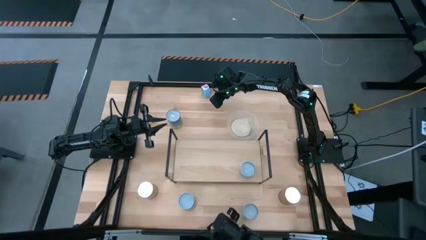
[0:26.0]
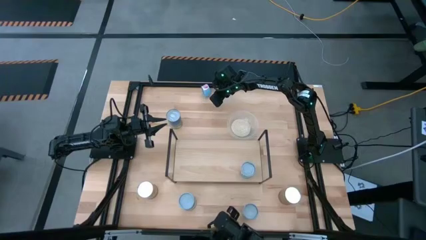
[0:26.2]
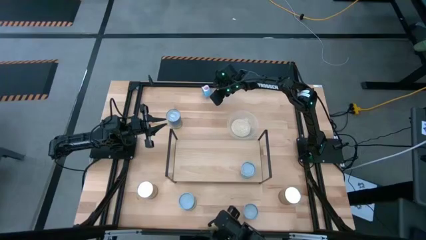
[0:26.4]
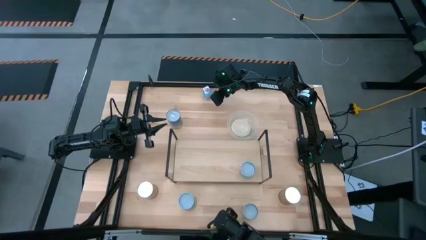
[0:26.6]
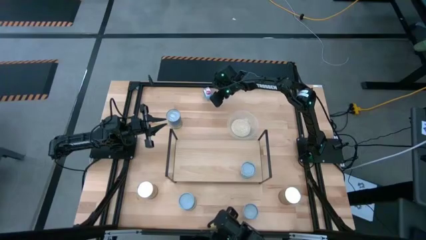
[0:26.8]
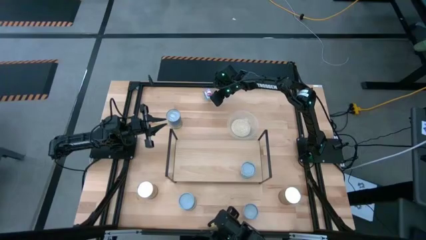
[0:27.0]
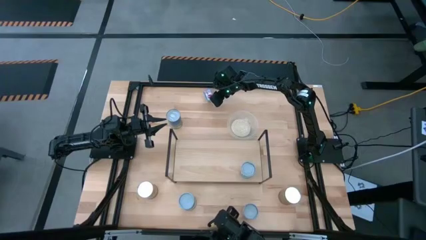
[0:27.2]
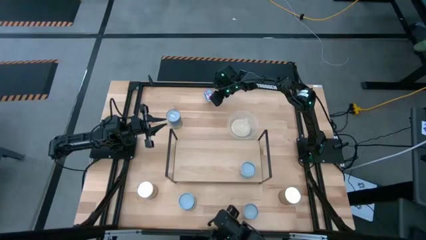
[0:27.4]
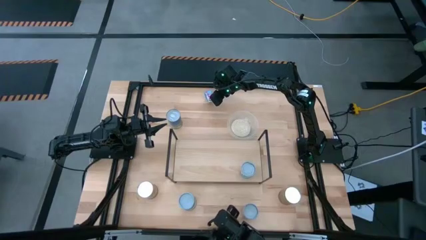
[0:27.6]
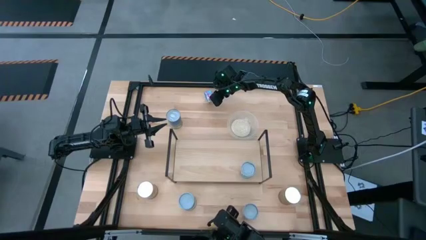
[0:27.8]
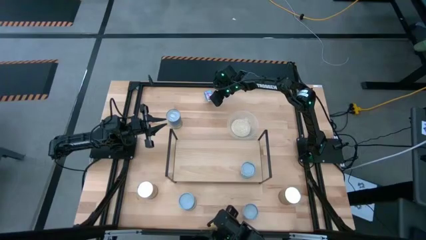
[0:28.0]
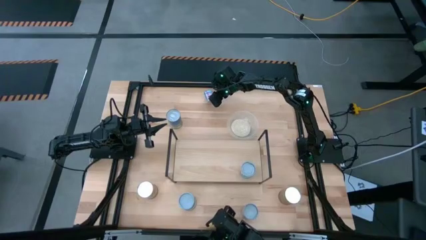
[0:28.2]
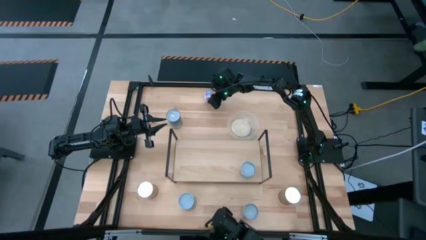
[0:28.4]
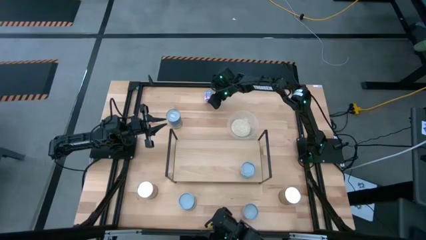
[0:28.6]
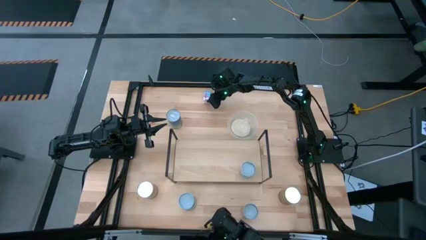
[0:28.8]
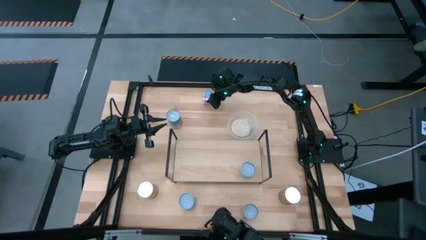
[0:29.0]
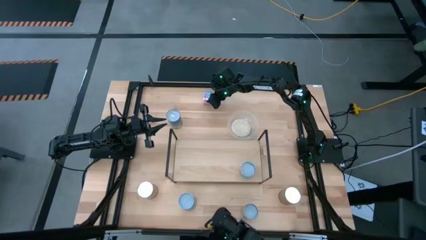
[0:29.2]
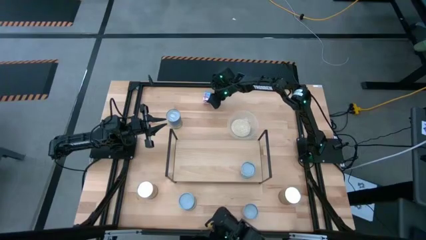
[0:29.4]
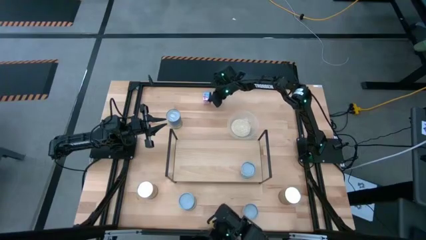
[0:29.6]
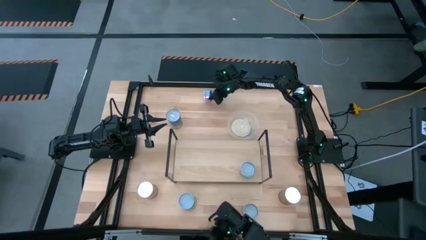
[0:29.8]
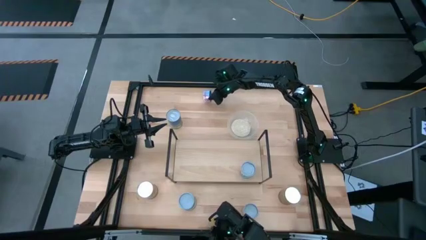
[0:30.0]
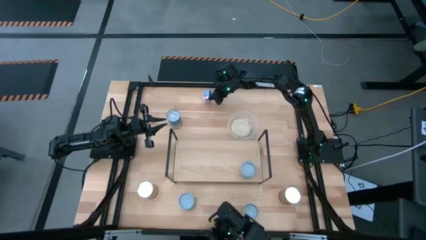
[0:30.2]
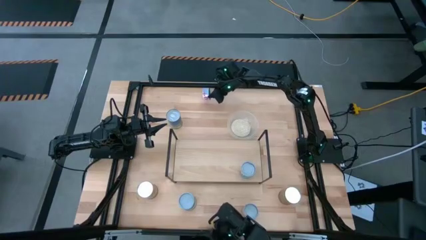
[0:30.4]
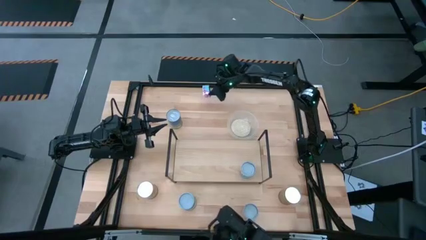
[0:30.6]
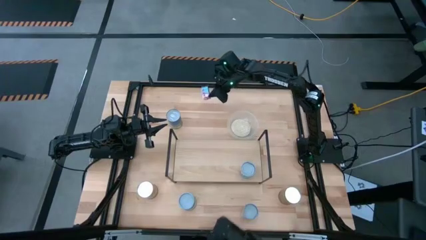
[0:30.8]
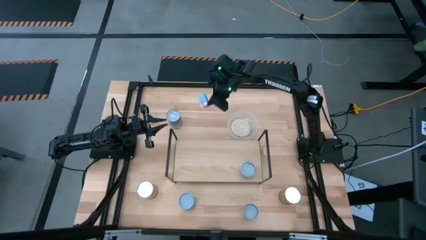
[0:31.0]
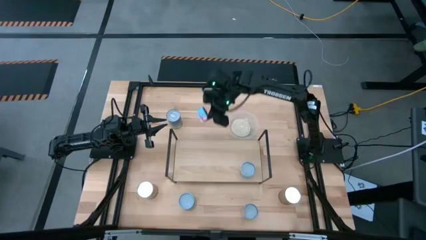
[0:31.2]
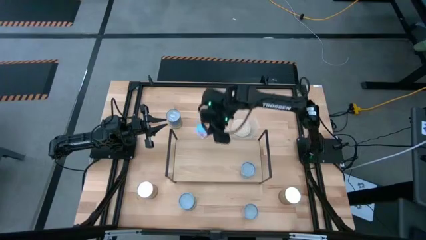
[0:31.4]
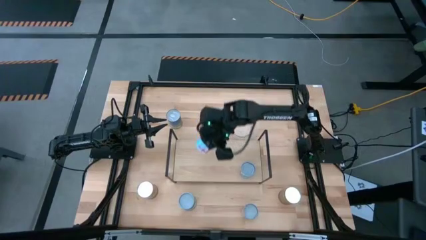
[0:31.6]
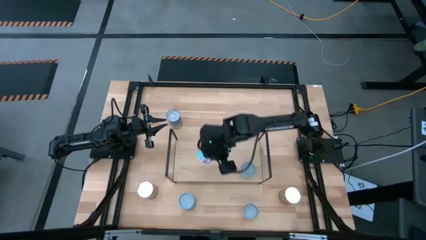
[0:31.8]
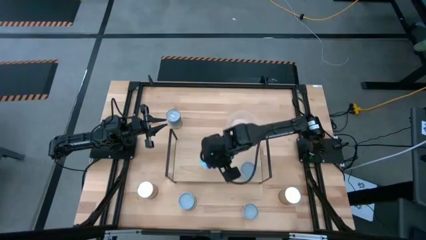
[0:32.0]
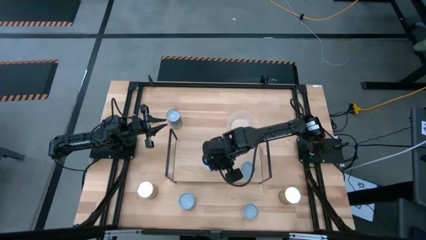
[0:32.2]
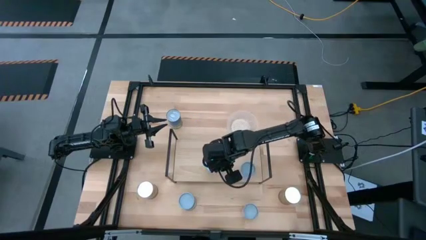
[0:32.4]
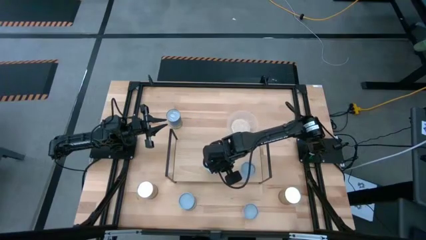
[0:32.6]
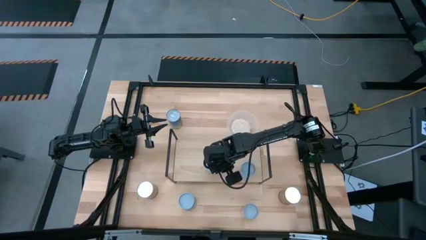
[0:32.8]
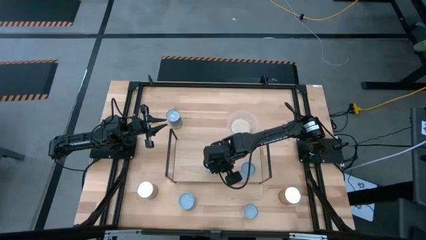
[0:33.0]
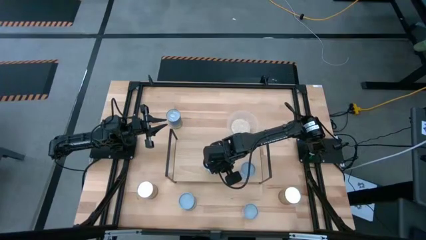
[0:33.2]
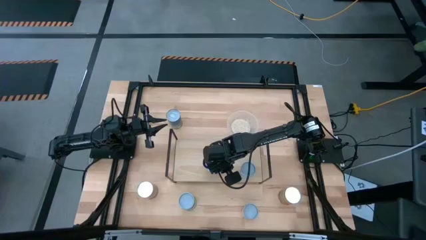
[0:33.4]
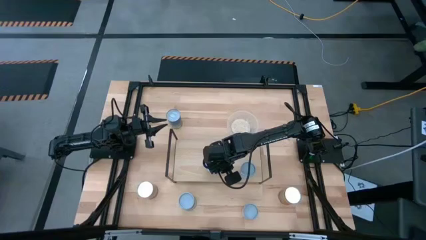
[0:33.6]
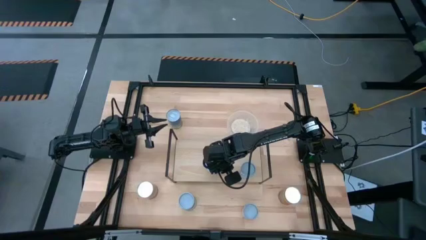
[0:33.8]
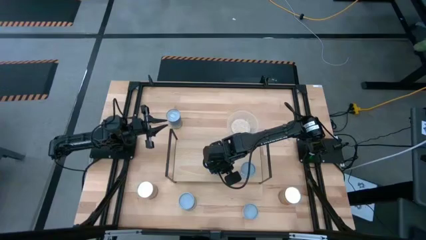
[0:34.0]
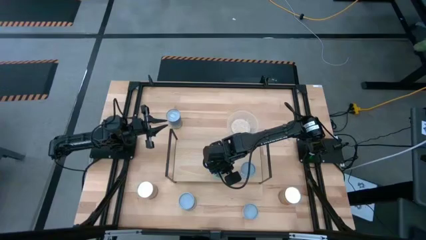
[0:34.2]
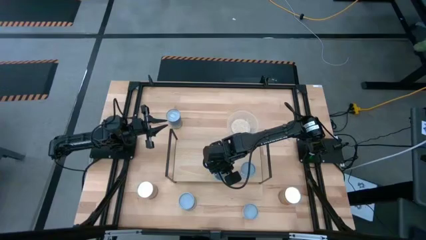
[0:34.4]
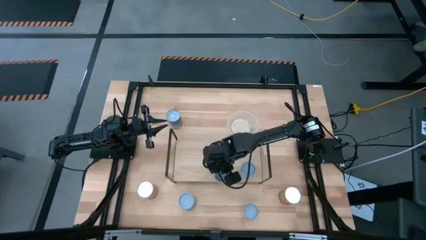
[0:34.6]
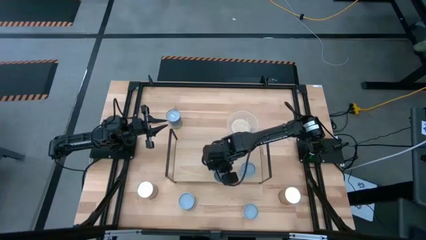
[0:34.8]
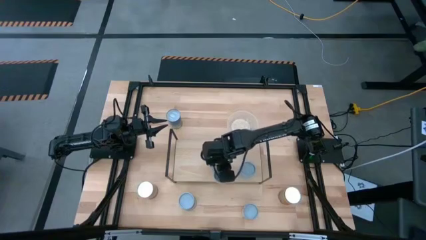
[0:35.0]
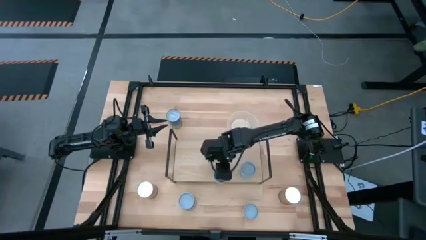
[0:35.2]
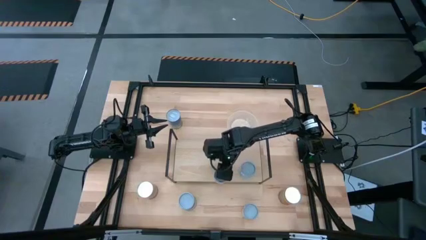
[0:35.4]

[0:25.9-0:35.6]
Task: Pick and place cans onto a shelf
Put the canned tuna on the shelf

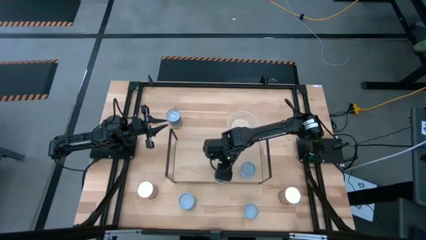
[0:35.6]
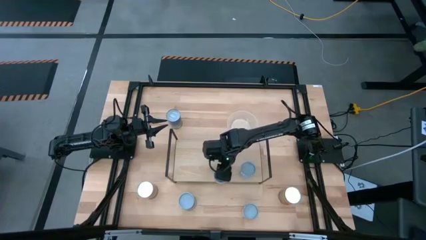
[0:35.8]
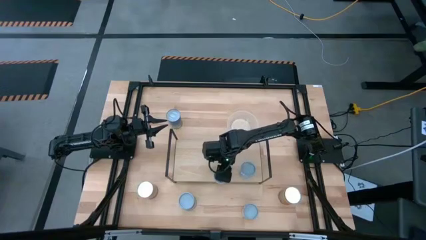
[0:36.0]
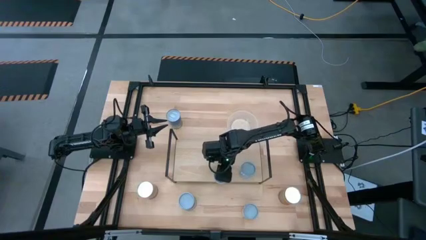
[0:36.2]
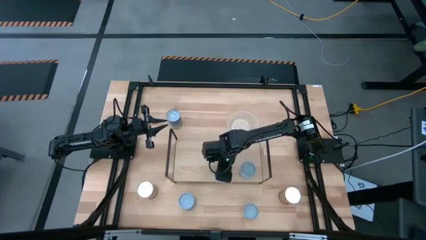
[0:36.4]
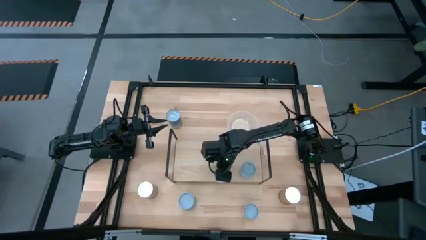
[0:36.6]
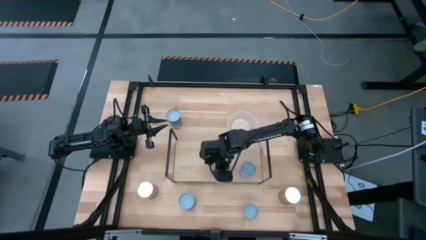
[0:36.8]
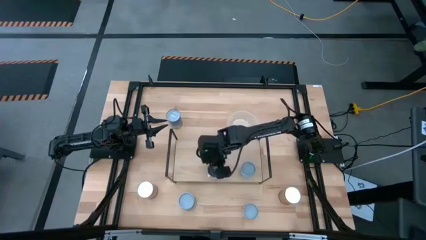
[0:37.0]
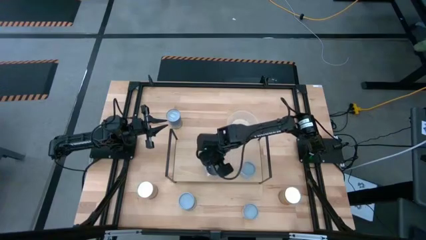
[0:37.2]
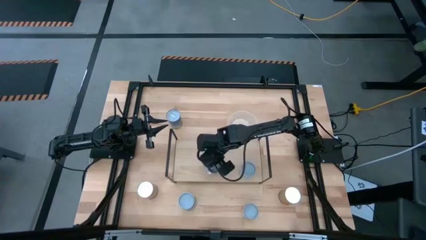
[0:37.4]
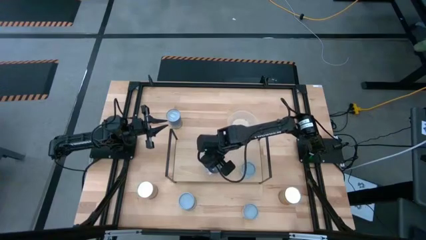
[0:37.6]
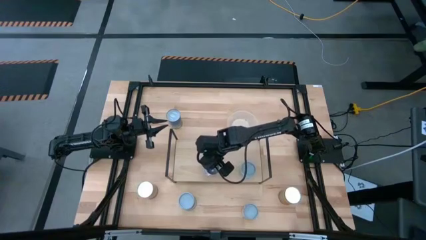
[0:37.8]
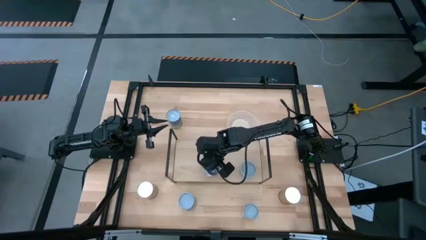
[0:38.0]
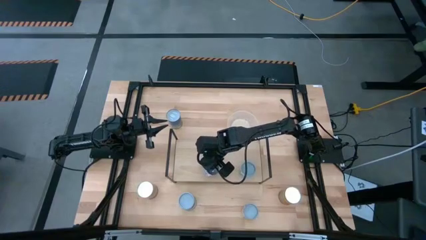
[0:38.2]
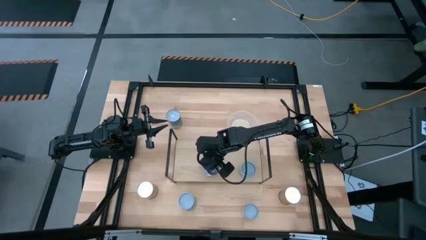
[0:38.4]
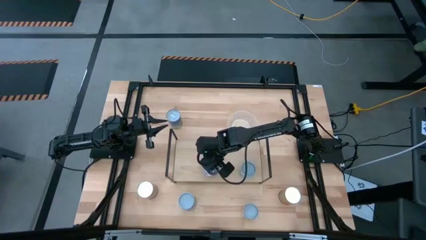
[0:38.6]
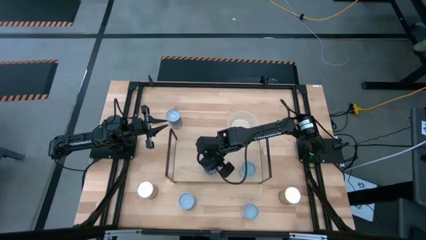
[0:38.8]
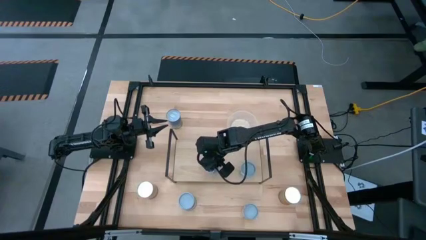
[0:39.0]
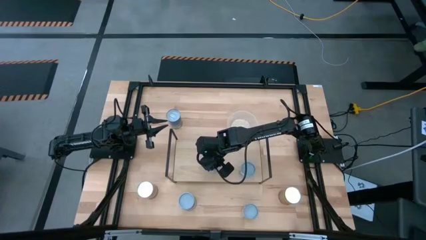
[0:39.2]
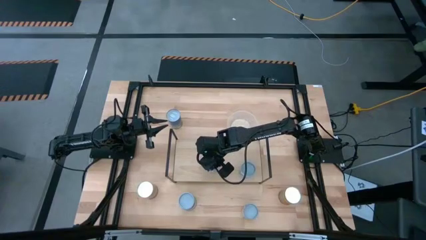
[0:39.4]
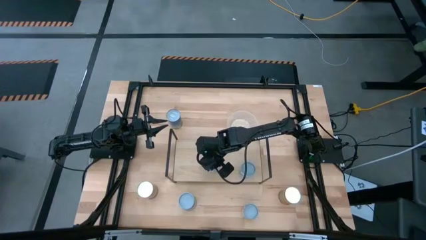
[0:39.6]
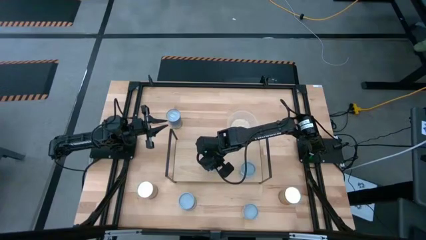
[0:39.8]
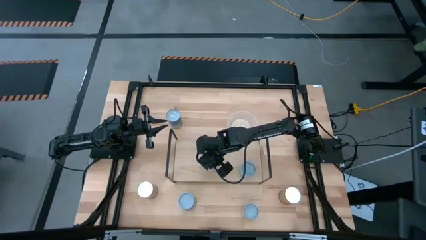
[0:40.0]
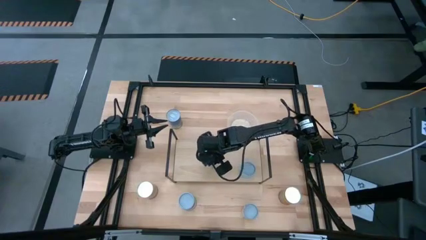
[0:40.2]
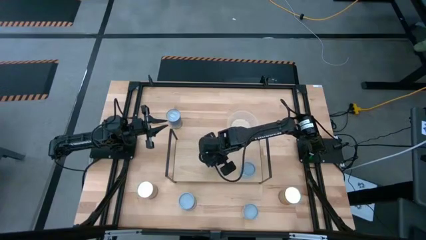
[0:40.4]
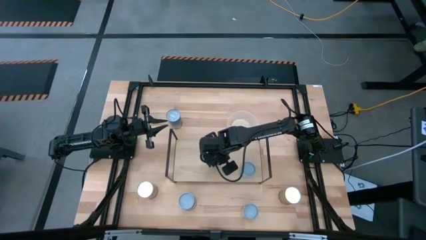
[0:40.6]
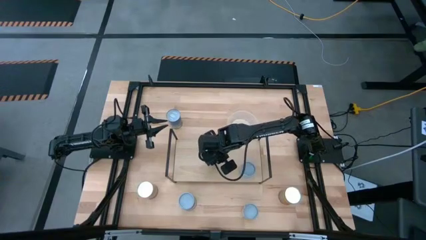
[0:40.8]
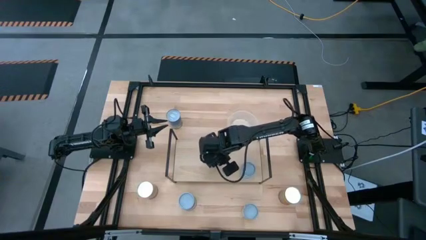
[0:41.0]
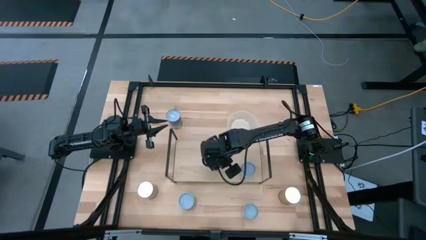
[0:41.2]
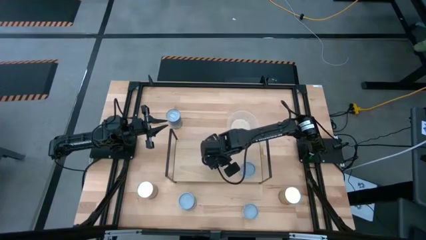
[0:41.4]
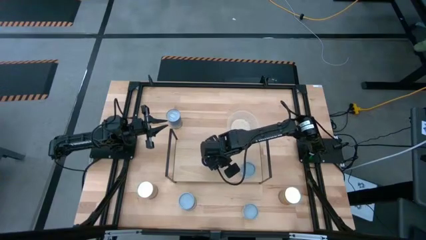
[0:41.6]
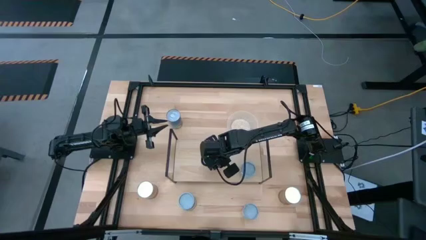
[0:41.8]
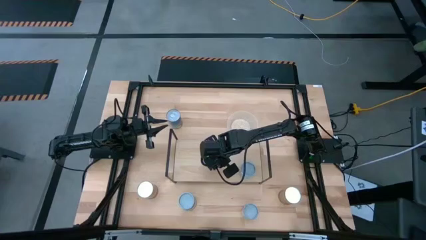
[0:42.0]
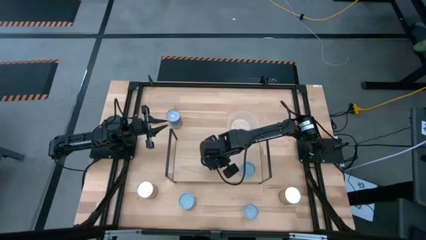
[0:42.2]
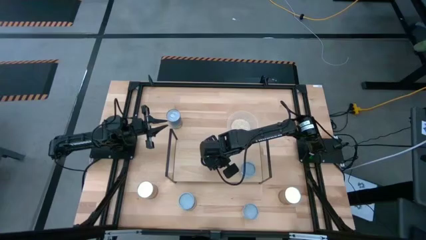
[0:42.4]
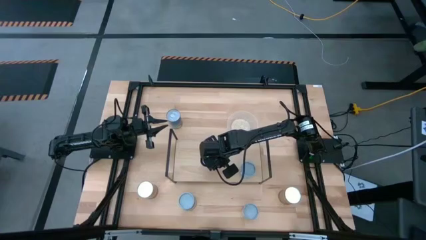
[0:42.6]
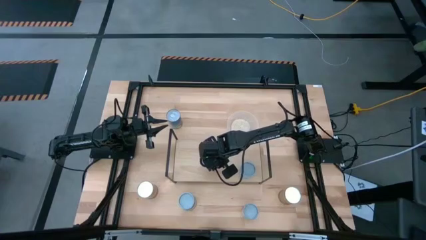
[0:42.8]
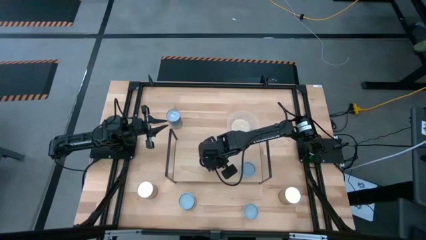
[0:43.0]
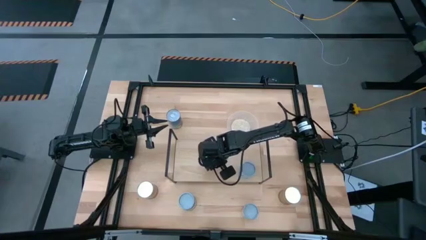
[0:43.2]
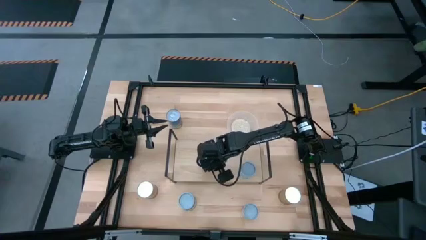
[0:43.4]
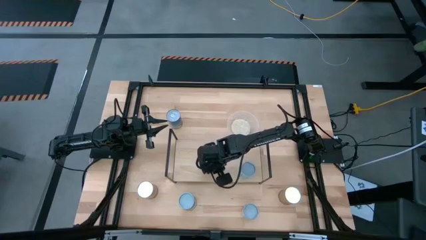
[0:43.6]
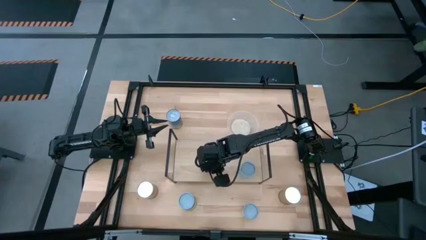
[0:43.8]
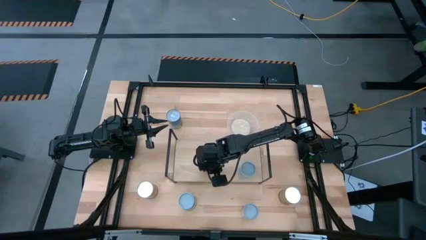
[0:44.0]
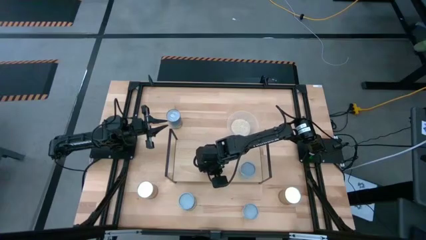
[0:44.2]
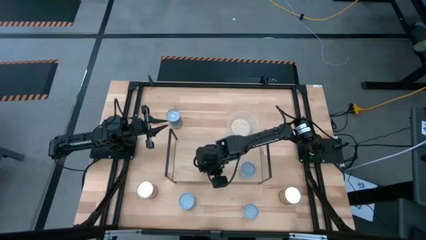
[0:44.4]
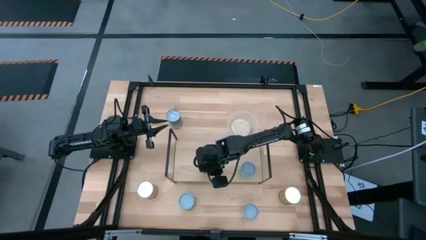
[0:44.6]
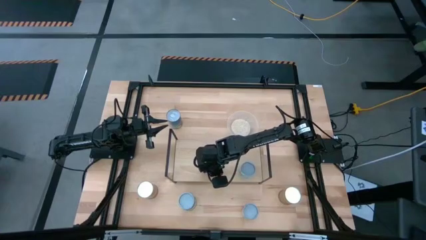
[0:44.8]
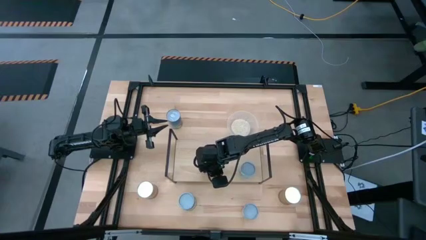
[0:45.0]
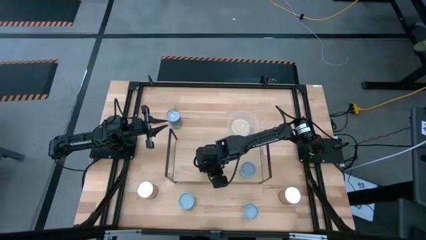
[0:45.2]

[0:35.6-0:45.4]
Put the canned tuna on the shelf
